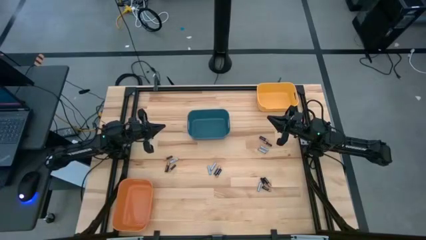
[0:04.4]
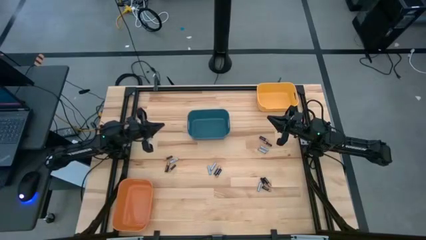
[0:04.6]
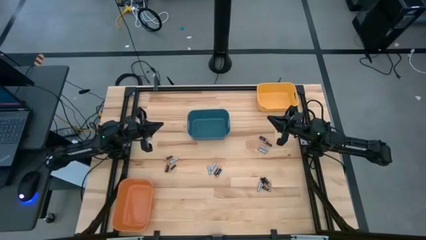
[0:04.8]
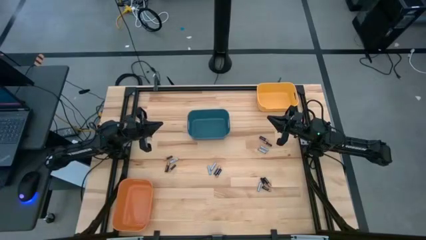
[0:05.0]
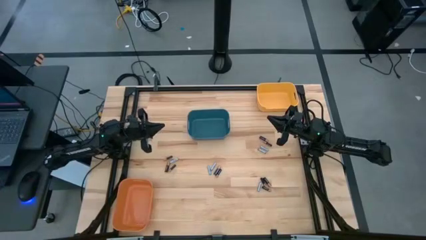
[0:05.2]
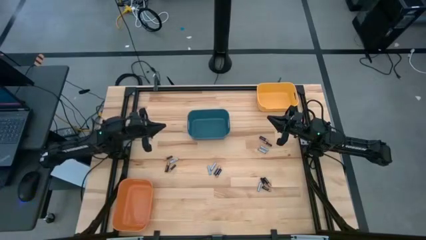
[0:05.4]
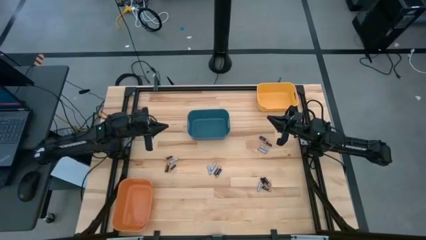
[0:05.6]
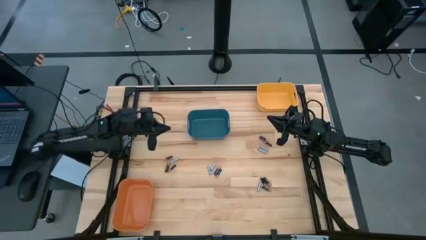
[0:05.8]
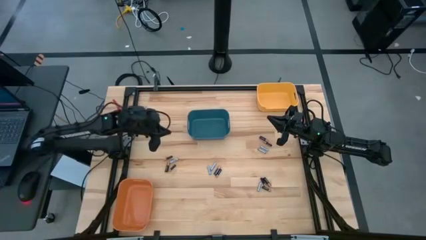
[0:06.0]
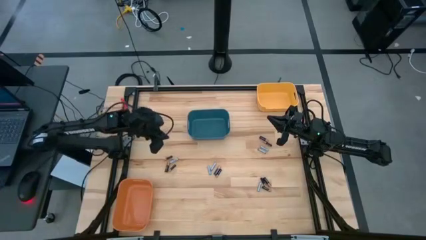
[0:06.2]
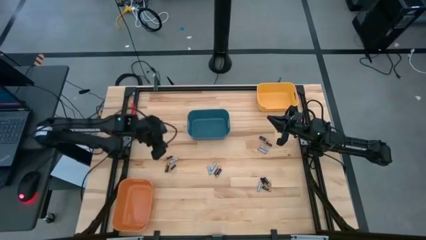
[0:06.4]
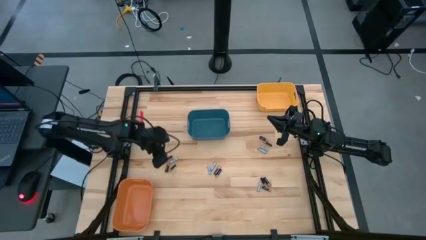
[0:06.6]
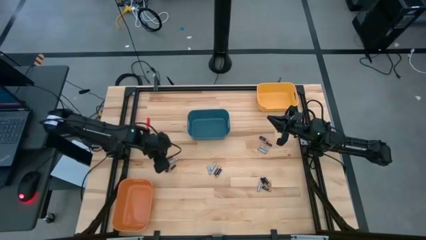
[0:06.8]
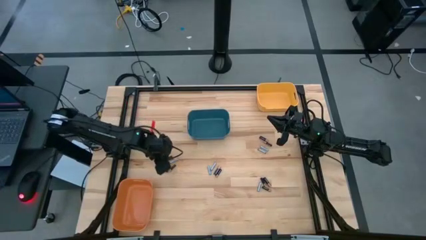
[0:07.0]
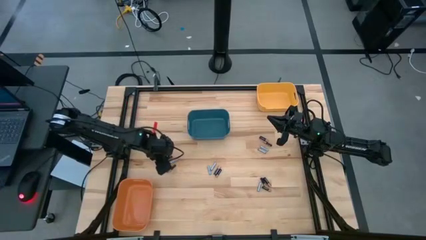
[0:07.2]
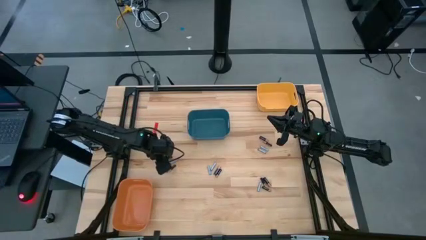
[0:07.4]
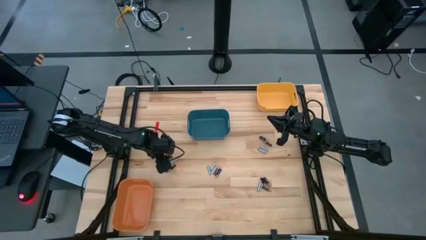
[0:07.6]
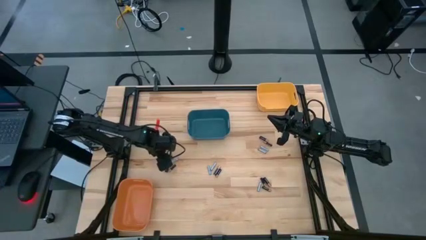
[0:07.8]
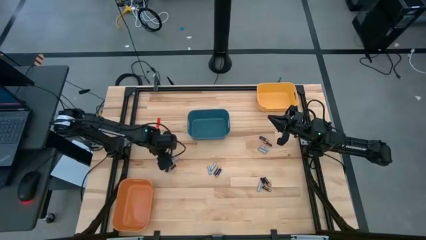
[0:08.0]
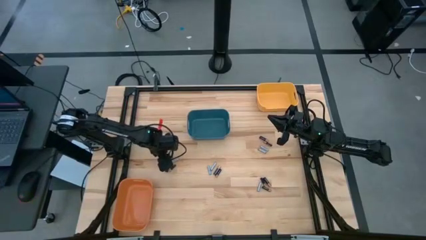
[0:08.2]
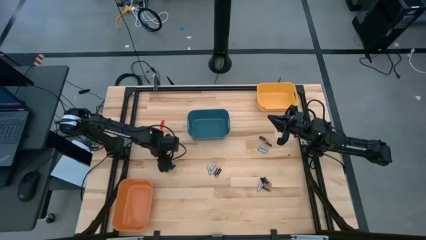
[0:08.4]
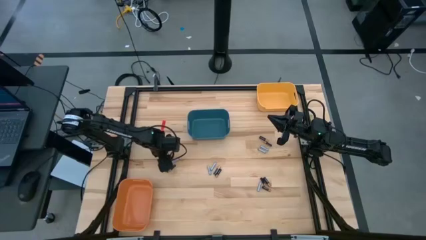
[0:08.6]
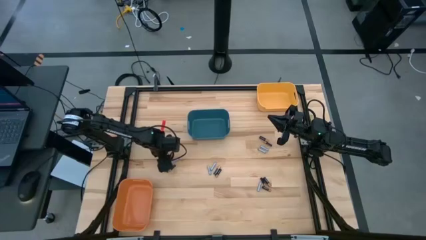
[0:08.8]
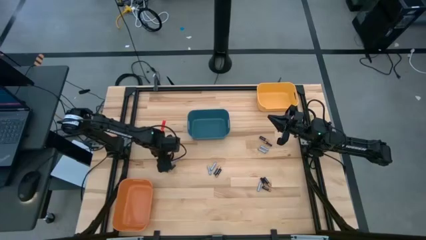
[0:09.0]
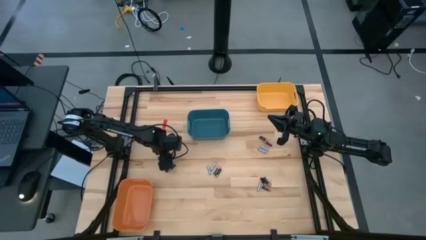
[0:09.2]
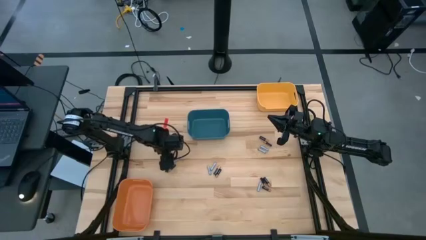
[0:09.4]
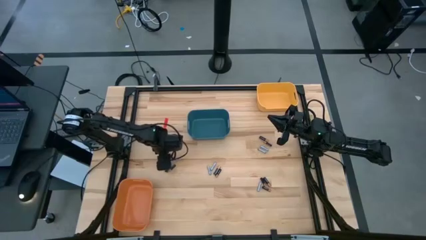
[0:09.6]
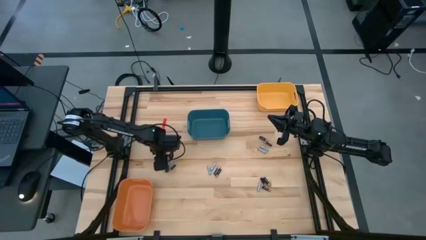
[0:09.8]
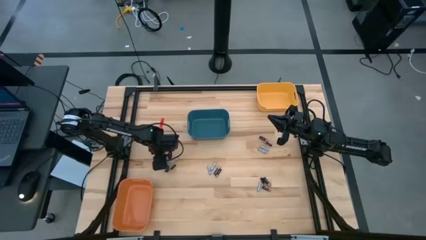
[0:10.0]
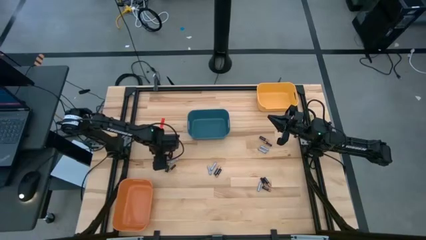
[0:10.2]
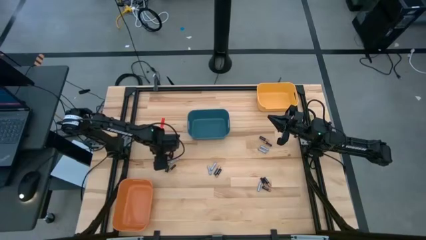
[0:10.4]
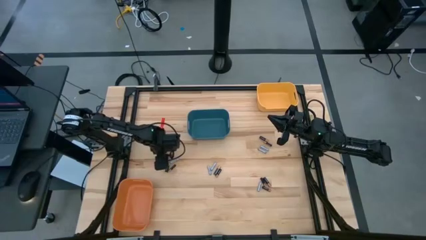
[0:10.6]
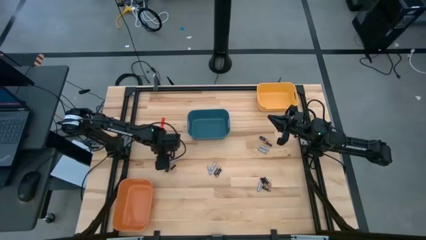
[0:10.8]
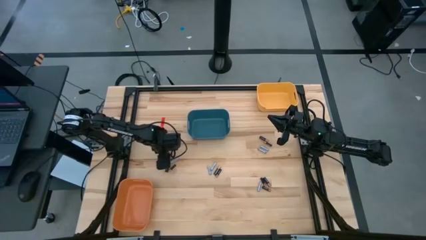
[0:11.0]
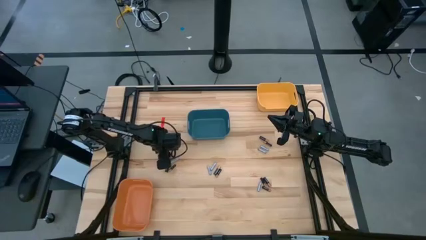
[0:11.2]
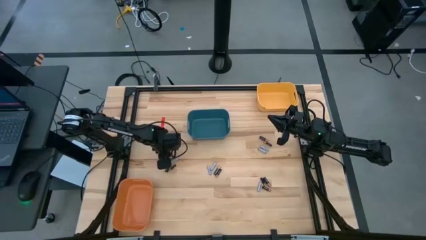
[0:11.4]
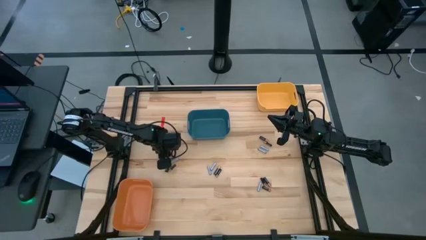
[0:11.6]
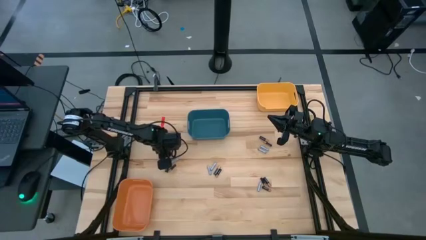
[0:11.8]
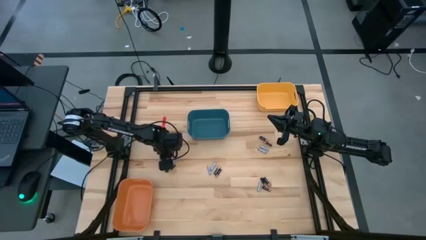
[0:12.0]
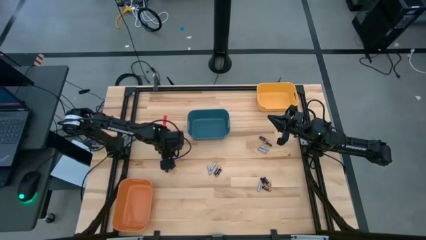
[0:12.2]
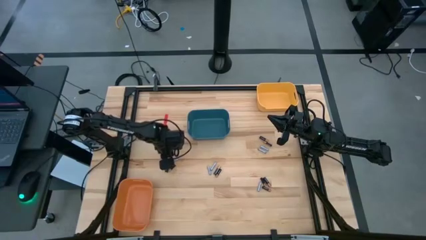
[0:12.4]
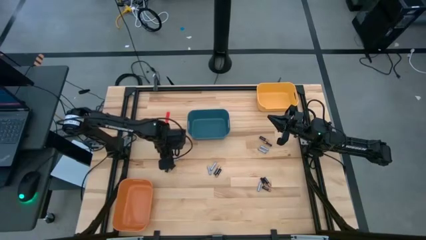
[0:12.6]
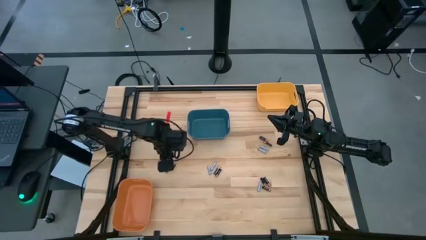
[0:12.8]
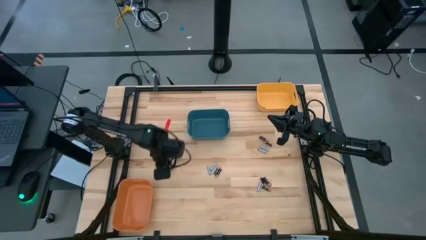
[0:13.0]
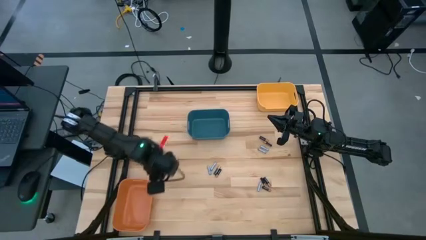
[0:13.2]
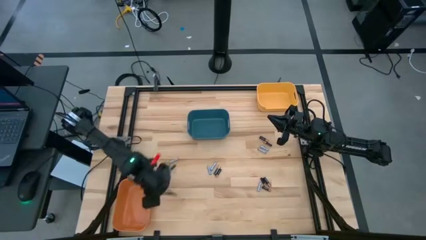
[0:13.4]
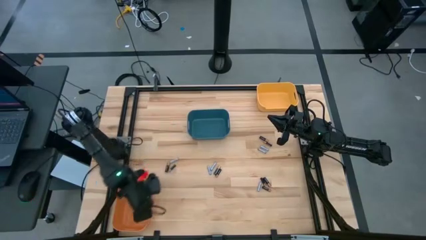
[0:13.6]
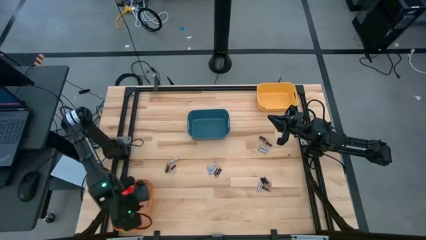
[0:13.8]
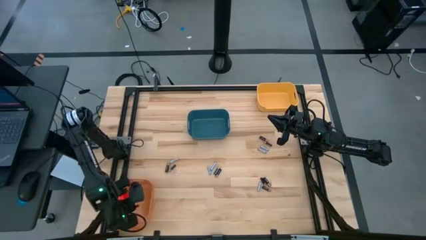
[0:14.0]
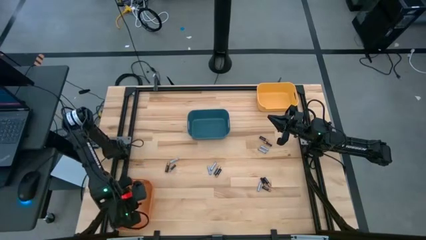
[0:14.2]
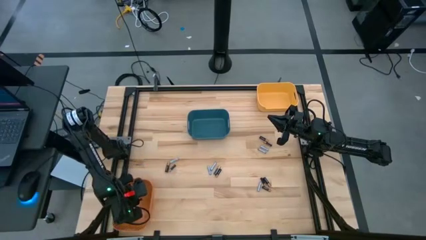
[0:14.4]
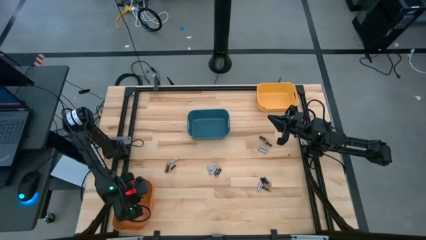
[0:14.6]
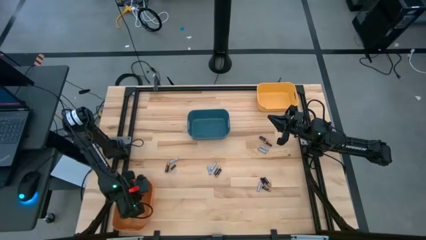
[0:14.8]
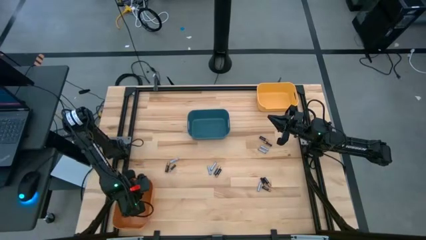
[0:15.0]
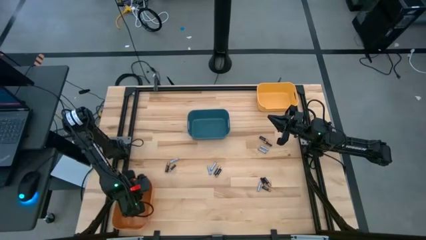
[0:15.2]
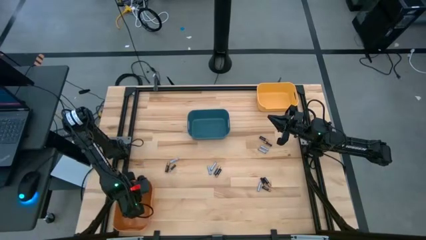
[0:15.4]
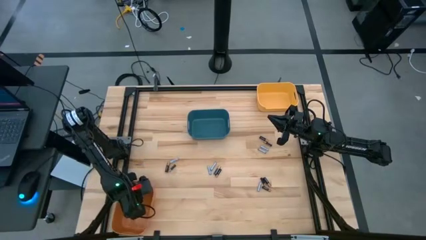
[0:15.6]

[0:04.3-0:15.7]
Task: Sort batteries
Put the small black battery into the orange bin

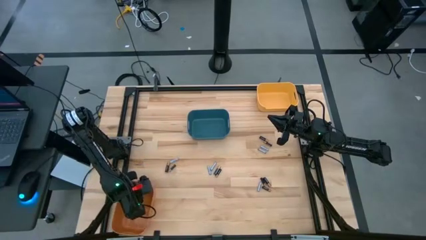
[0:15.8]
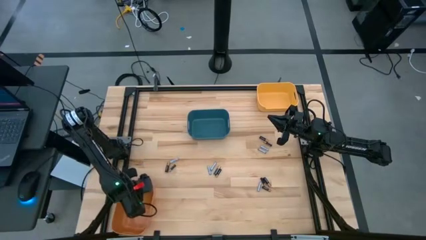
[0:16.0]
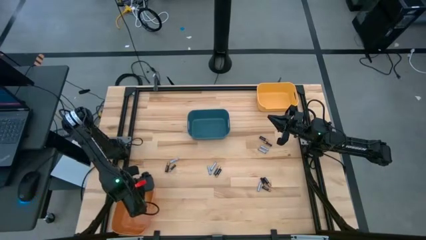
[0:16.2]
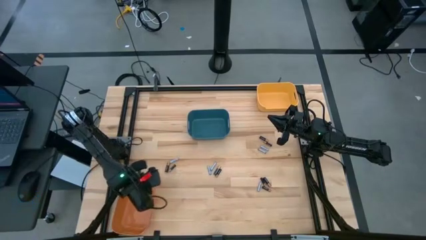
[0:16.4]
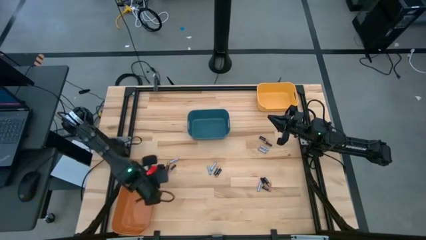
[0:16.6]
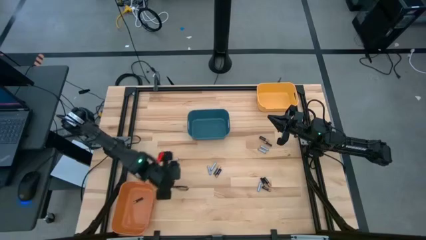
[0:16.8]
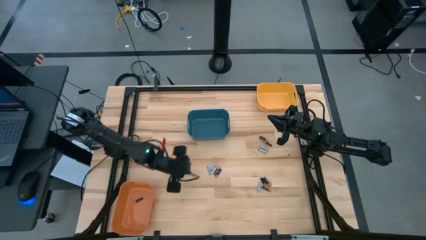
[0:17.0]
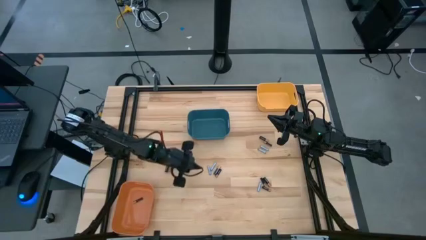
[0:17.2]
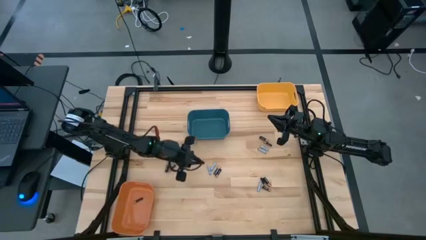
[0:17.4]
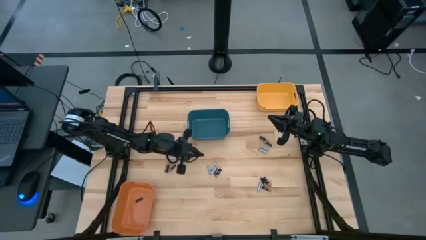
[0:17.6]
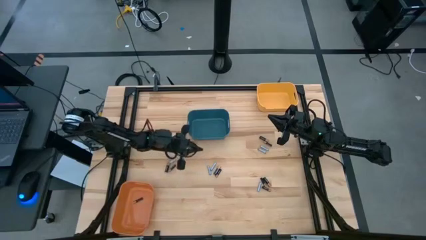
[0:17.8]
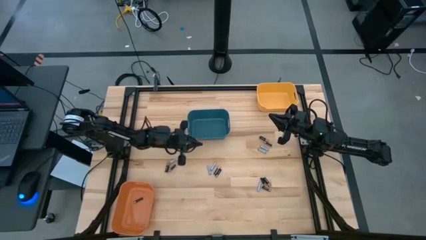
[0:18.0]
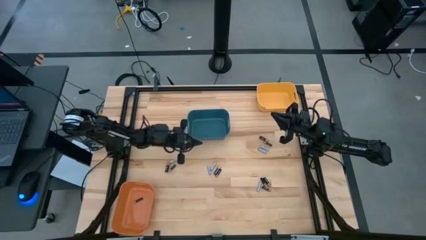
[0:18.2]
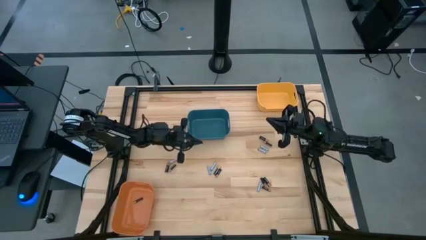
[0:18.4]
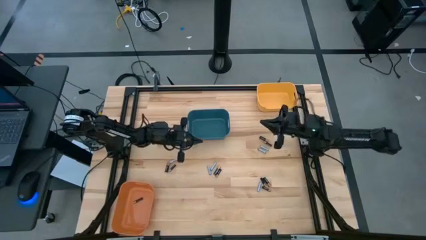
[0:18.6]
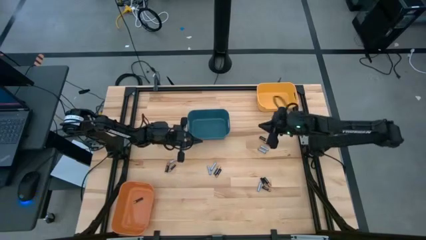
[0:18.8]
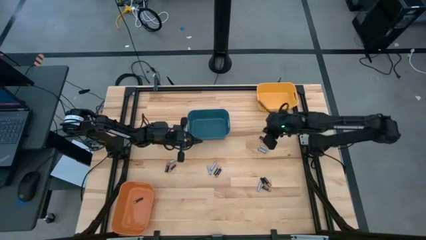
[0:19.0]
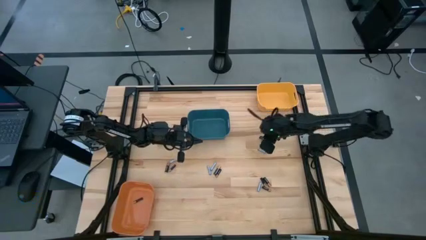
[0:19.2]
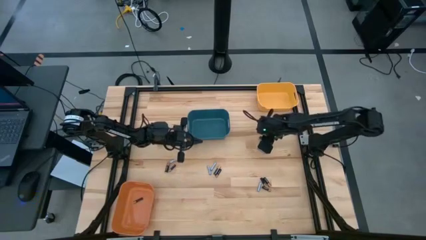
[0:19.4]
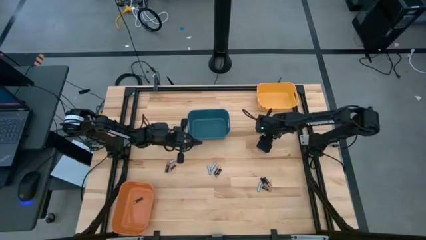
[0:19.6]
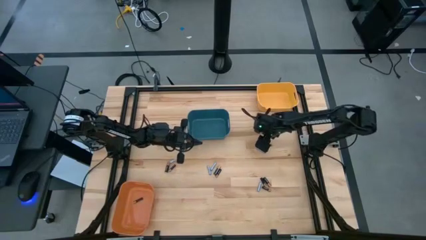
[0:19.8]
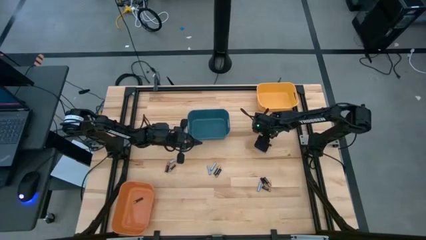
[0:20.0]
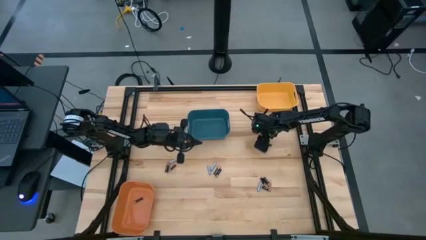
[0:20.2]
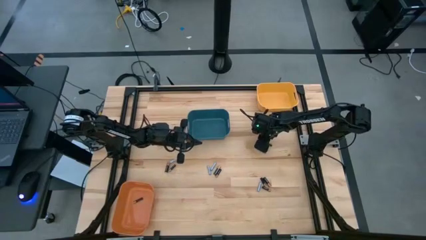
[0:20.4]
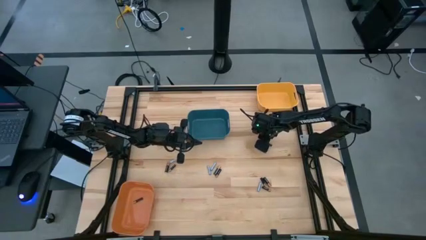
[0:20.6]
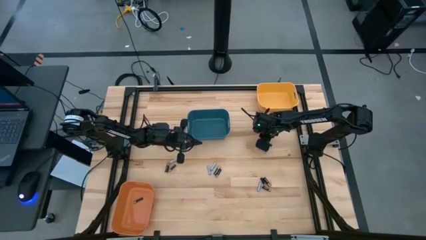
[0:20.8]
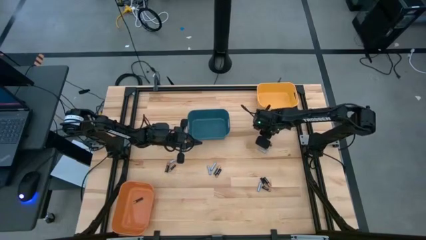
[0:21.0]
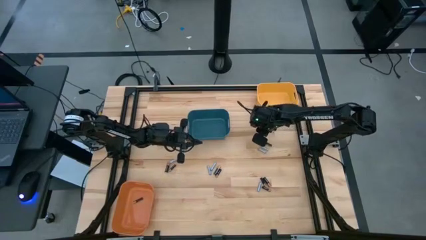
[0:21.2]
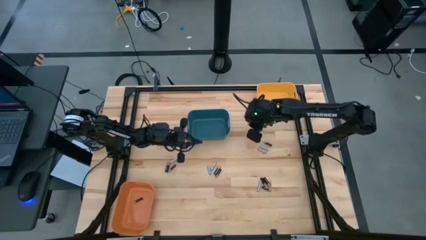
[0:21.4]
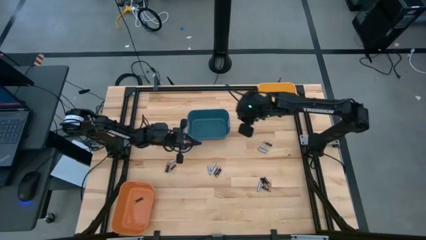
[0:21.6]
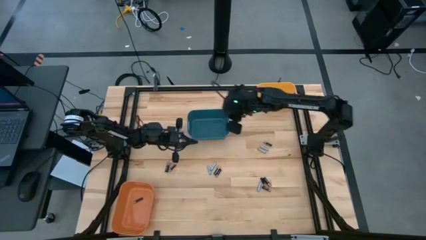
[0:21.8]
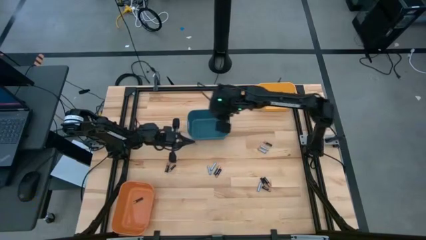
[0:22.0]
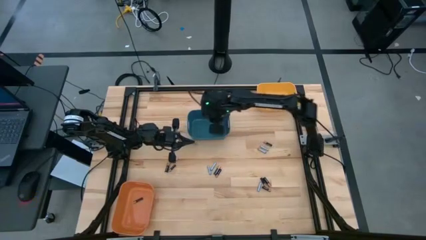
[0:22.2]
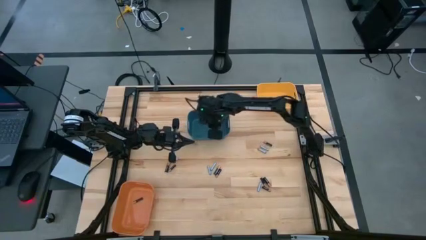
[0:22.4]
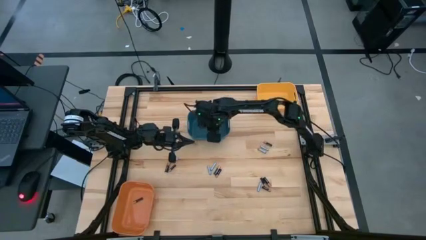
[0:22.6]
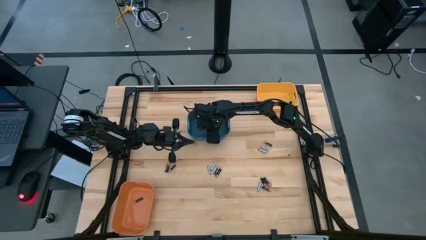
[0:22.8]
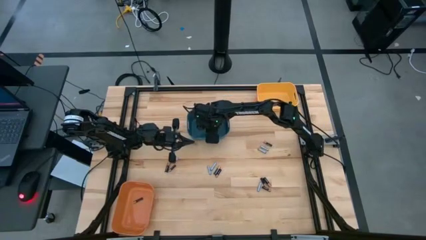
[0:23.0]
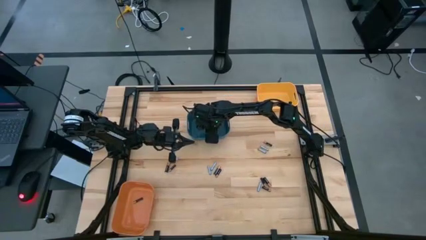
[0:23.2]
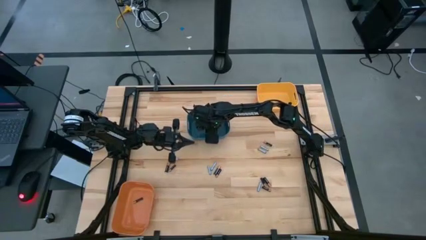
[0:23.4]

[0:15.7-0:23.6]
Put the large black battery into the blue bin
